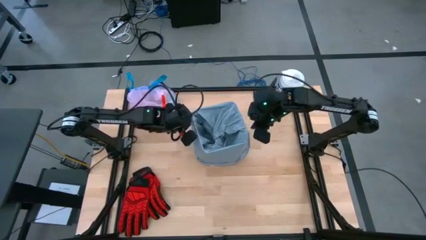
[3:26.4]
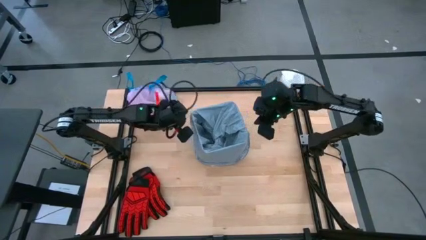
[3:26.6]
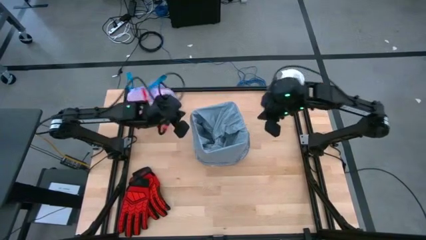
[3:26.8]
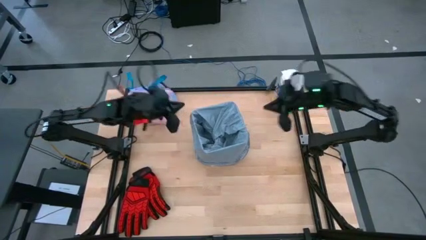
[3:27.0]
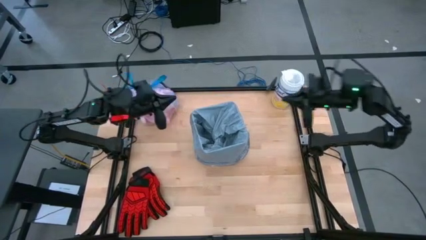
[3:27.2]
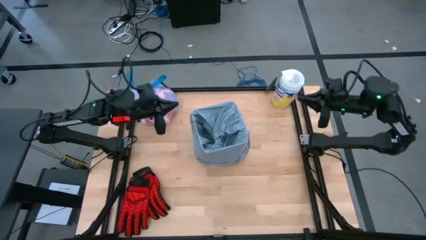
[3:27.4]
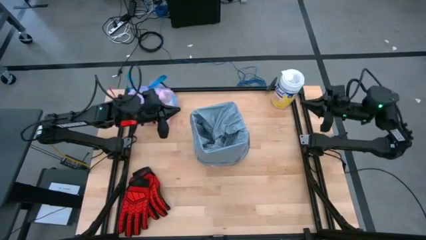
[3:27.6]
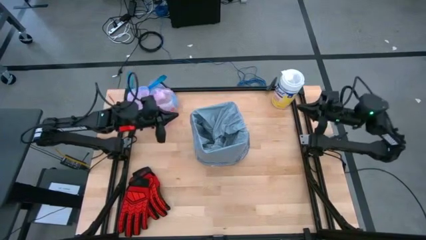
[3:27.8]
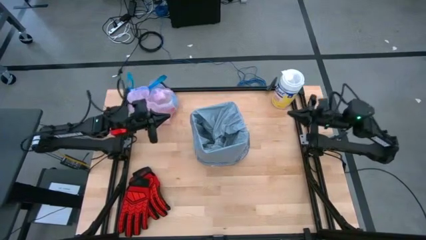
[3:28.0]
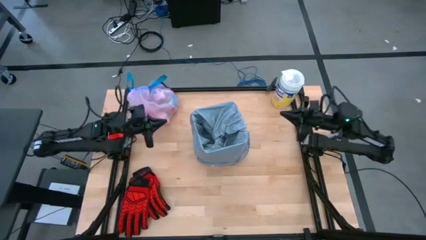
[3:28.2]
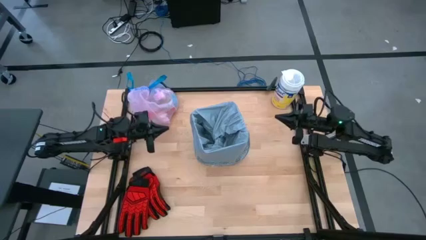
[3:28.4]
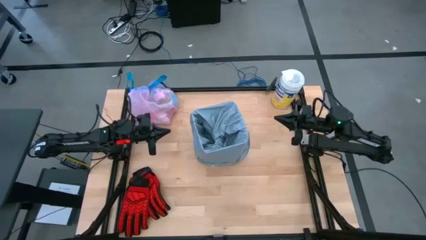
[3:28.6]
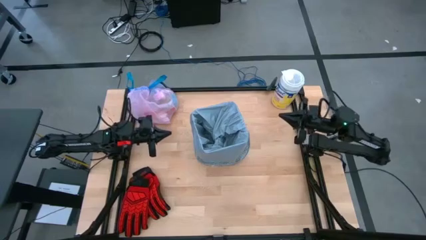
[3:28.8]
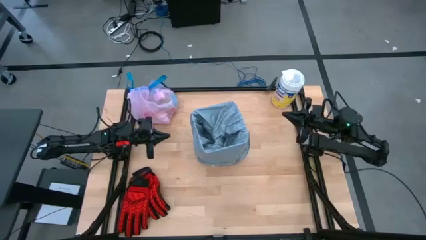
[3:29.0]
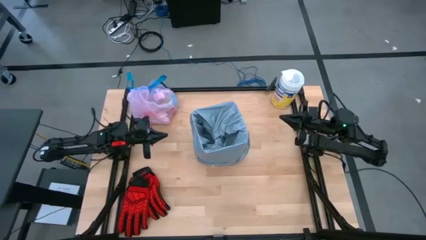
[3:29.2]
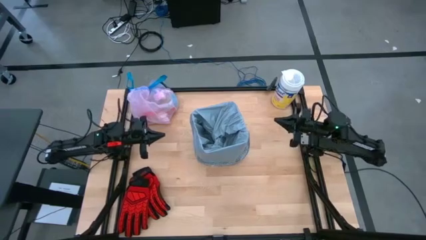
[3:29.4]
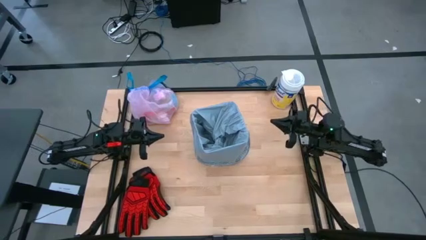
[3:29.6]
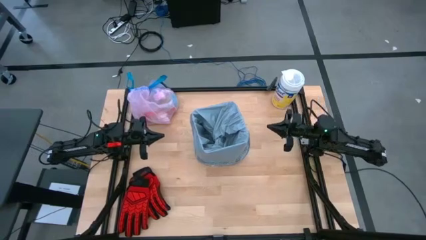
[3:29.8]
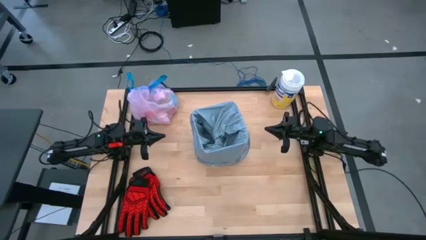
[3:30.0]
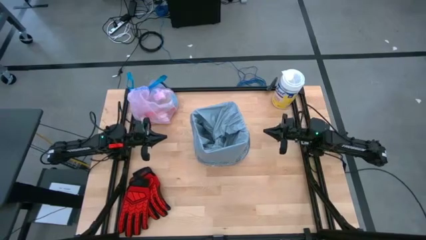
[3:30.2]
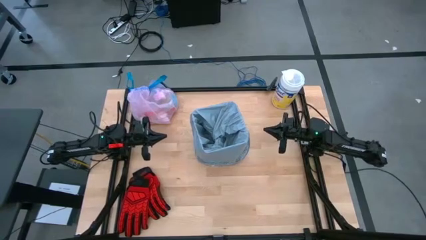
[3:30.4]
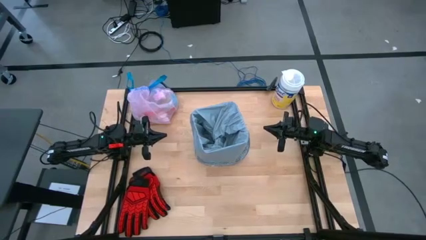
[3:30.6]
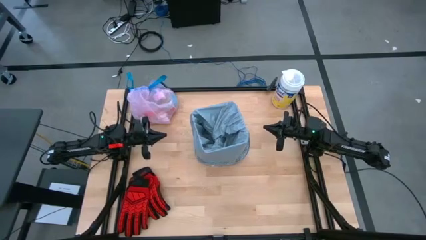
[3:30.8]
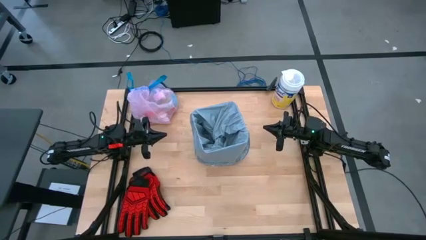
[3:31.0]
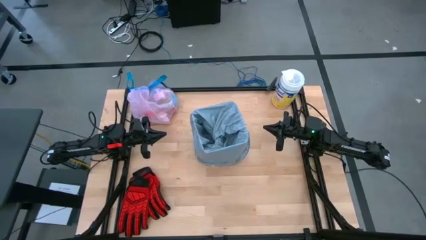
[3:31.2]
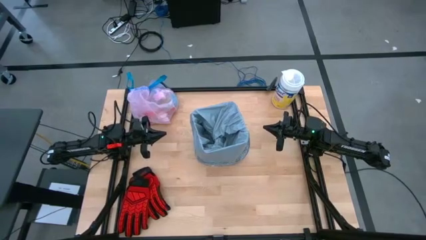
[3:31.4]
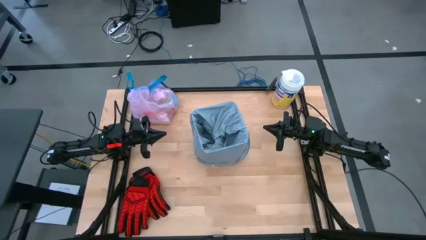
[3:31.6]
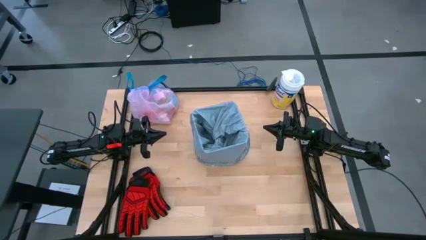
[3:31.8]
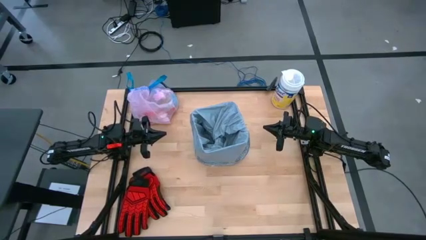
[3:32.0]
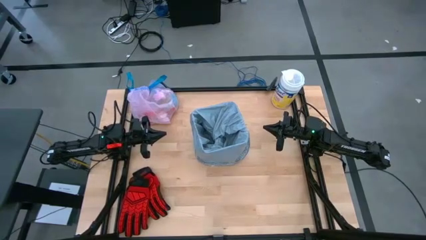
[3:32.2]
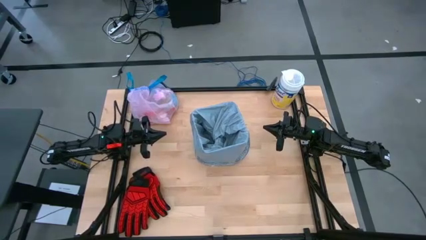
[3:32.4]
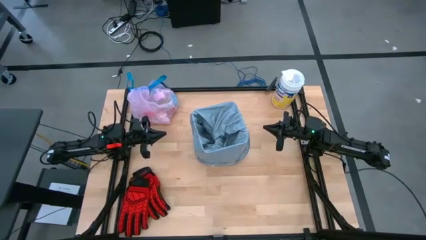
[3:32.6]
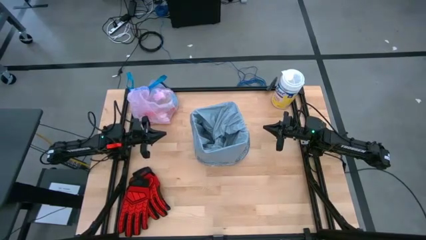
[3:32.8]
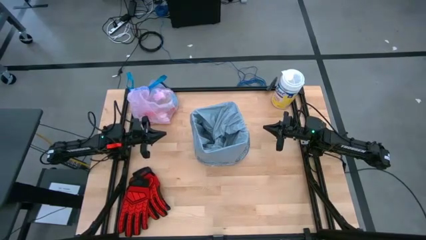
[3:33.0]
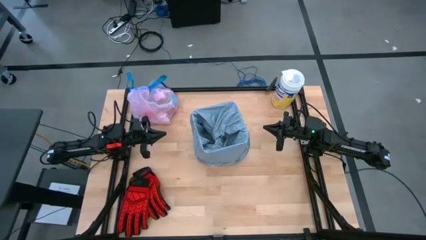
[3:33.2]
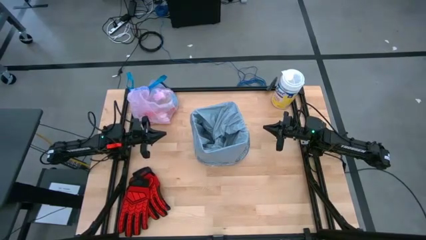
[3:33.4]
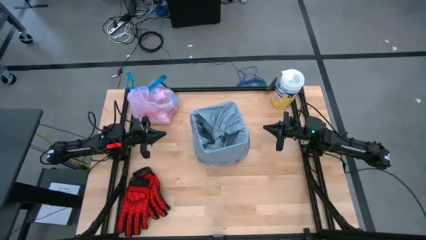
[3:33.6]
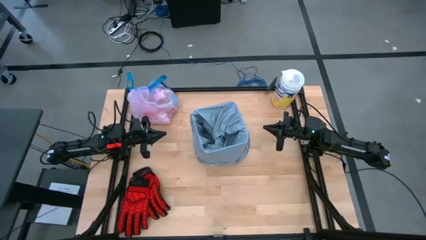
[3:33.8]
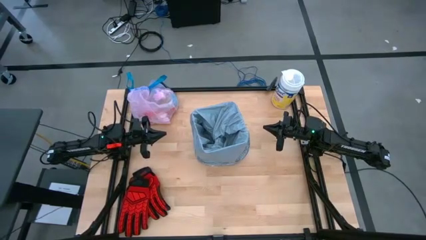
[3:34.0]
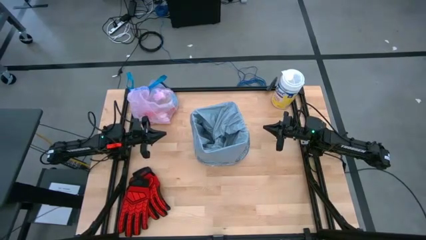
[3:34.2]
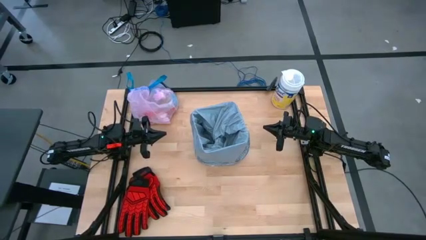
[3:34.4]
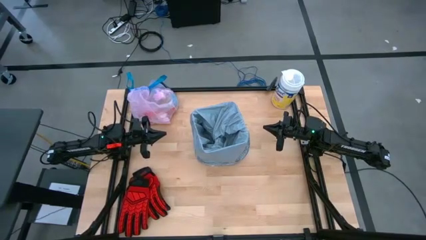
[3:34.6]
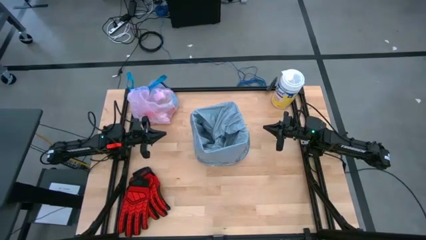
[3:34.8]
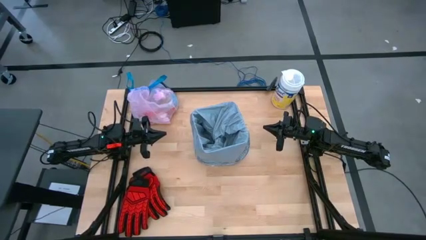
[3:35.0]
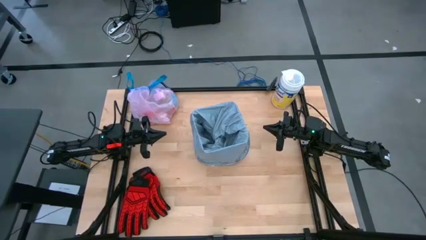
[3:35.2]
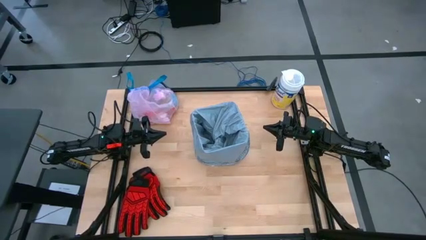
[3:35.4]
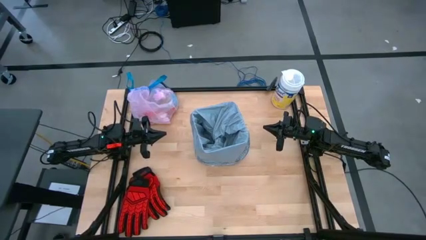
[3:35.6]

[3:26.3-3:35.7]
Task: place trash/remove bag and relplace
Return to Home Position

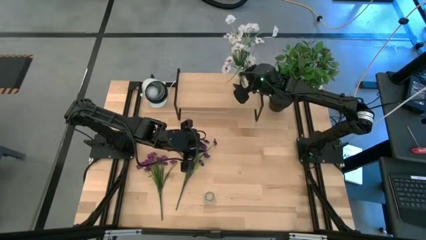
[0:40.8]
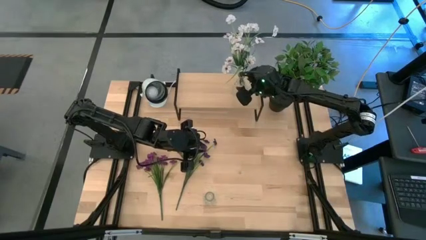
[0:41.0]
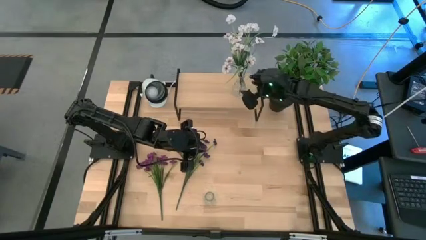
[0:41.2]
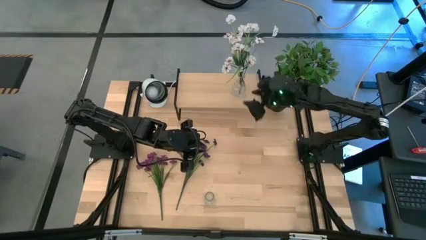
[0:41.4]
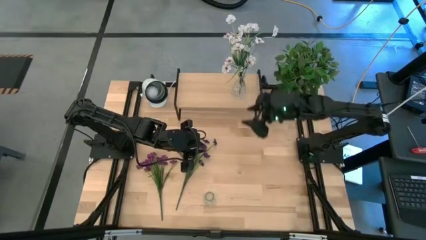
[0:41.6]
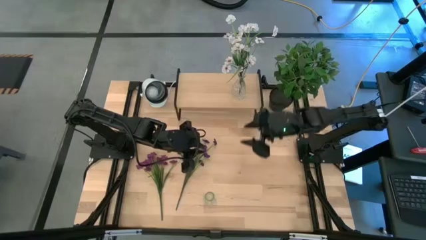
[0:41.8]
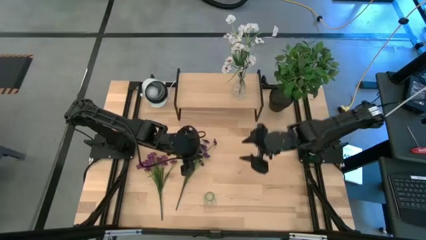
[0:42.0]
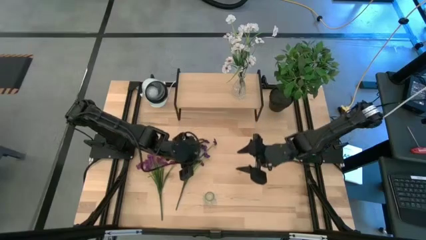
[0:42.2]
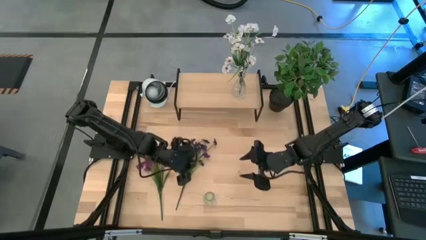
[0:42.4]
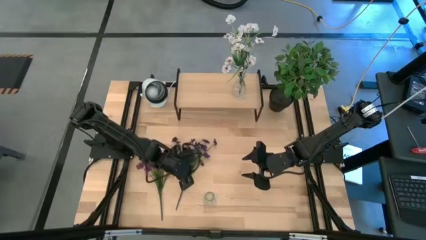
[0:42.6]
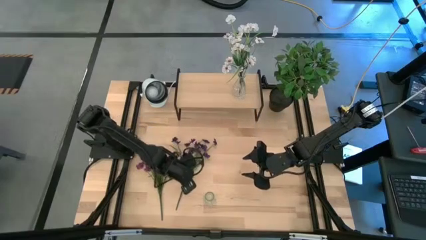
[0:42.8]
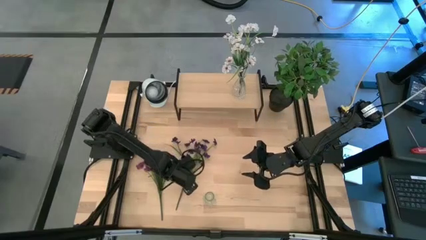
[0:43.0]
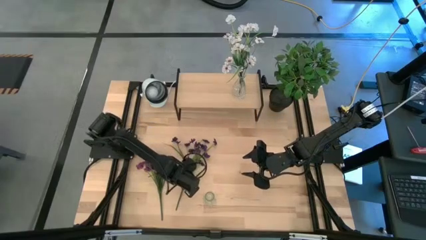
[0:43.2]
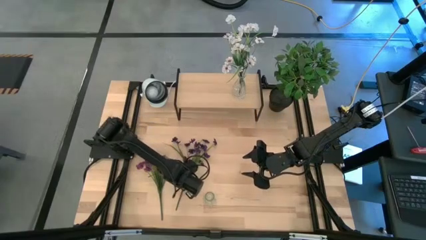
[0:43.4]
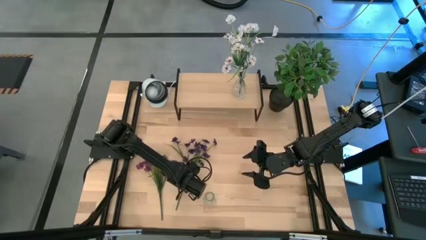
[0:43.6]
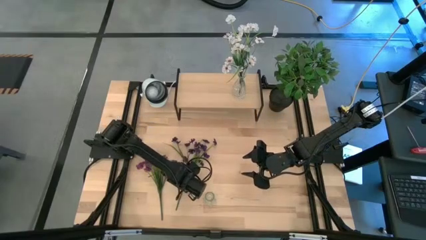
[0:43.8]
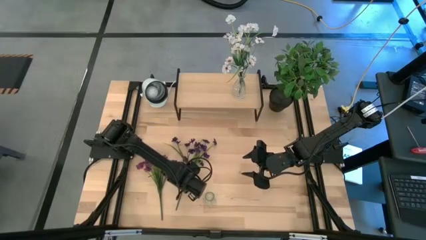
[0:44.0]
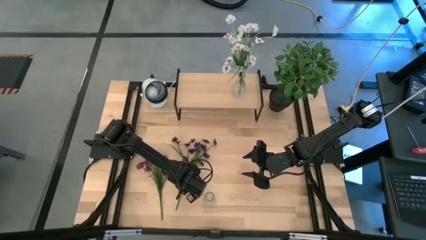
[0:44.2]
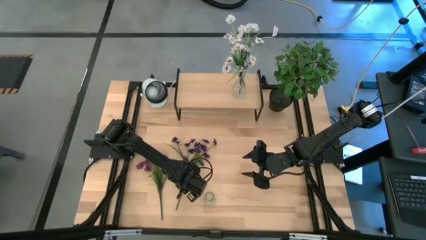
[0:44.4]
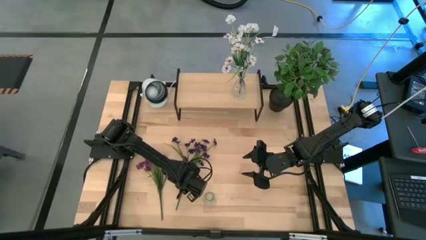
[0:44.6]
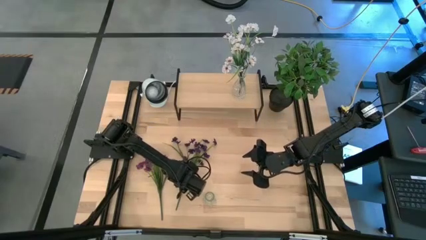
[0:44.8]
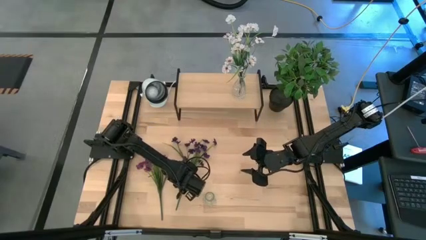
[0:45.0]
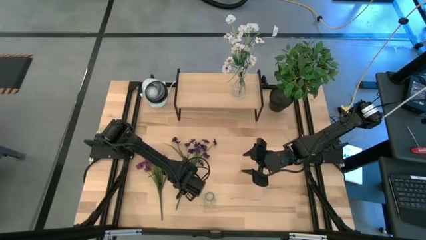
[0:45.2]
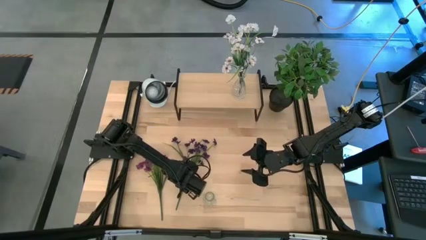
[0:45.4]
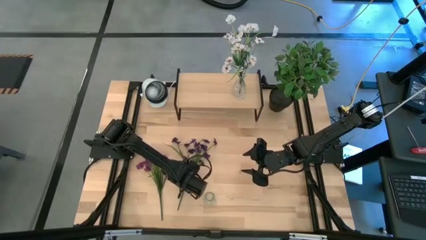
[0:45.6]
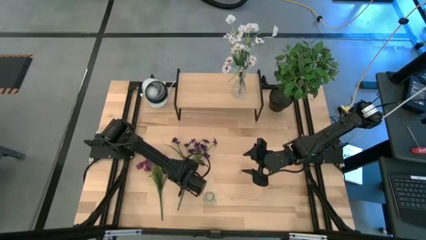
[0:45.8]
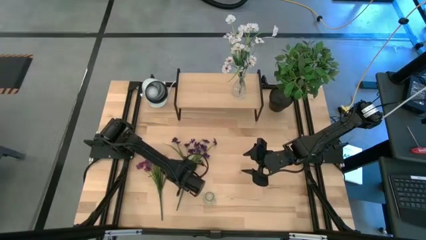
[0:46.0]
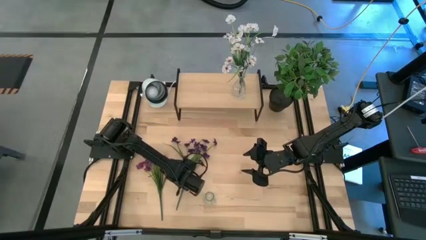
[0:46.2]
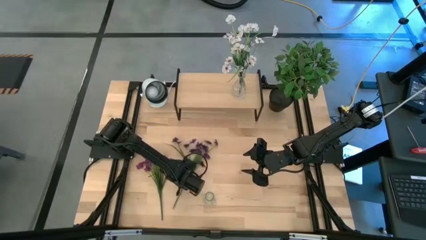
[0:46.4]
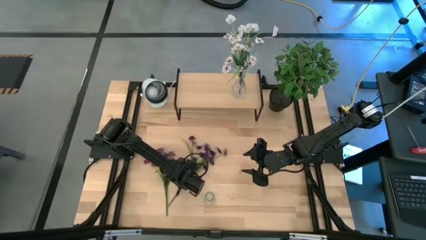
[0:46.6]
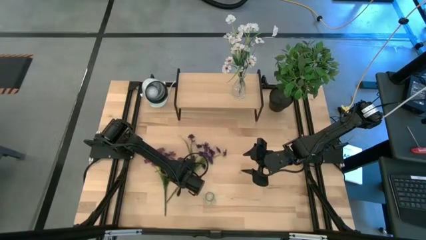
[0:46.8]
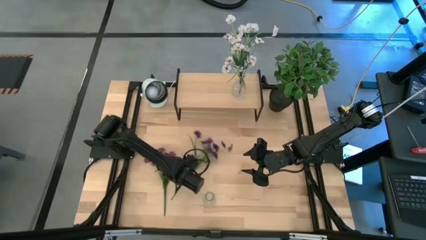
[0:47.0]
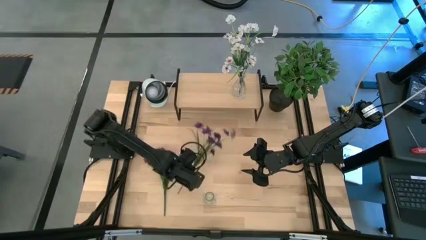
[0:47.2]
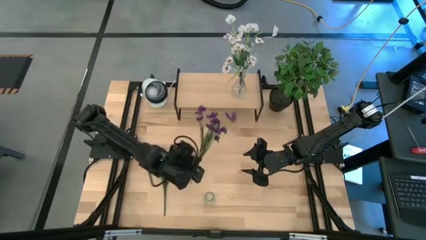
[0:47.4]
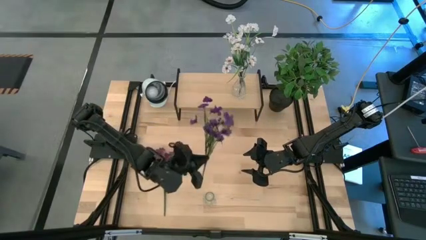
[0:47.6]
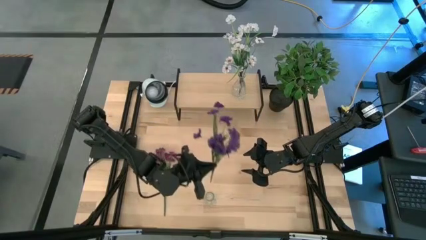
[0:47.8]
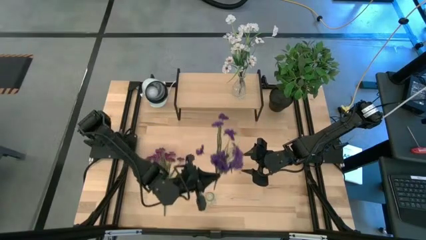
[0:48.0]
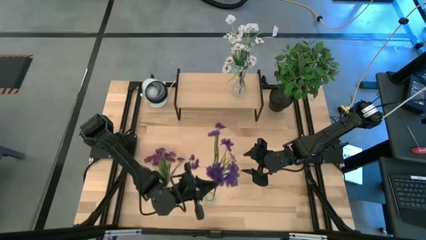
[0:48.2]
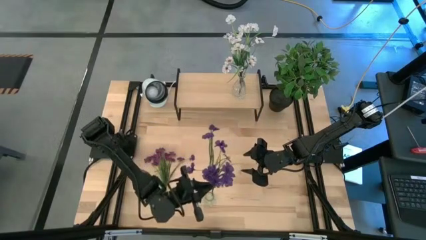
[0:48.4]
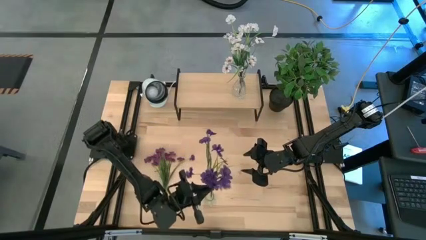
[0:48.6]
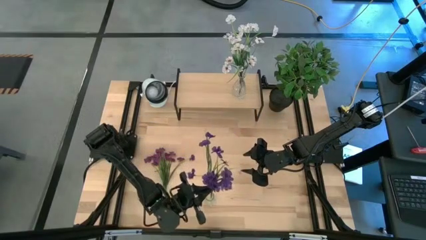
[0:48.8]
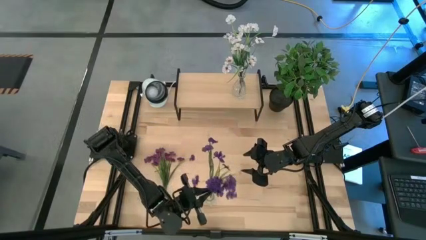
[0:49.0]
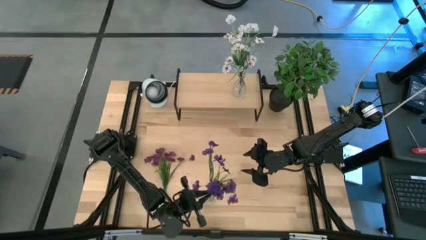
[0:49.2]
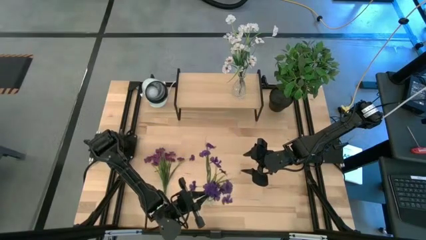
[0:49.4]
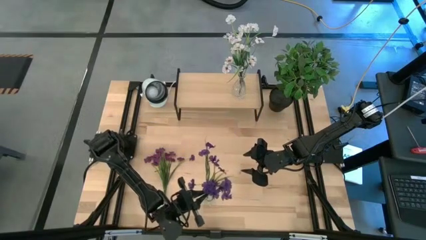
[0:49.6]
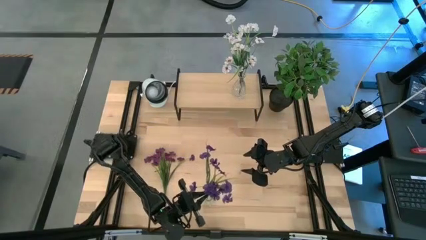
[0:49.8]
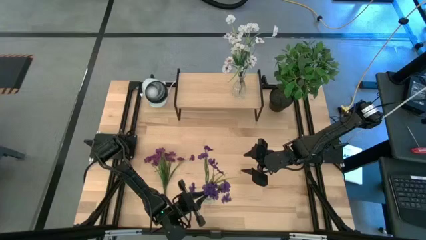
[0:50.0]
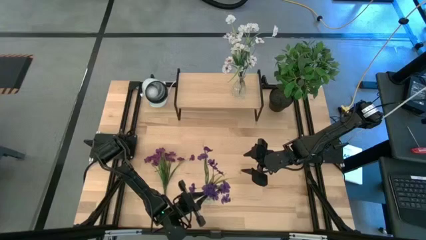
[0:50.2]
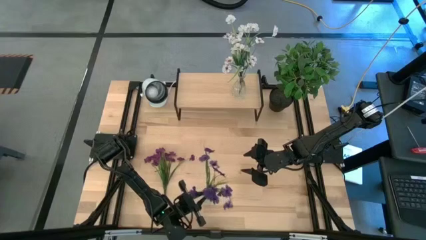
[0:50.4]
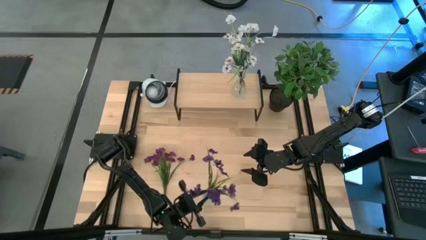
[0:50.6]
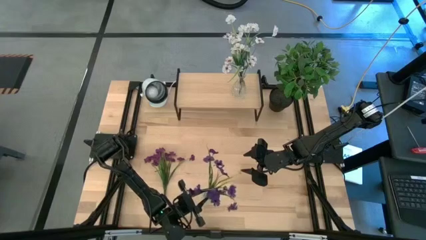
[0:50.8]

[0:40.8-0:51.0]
Task: Pick and place flowers into a vace then onto a shelf
Put the right purple flowers into the transparent vase
